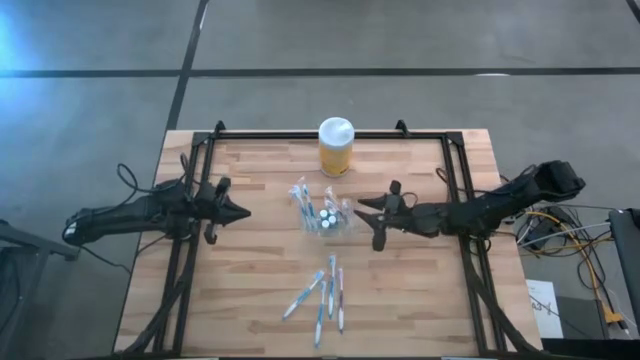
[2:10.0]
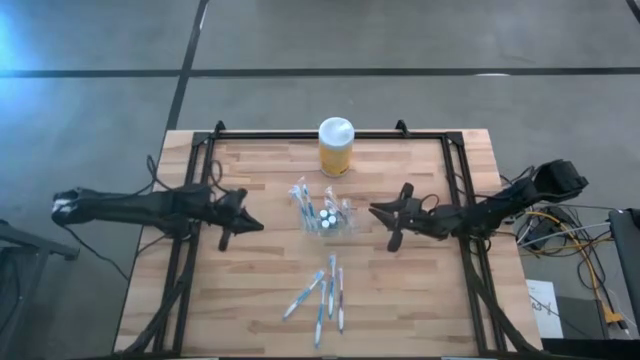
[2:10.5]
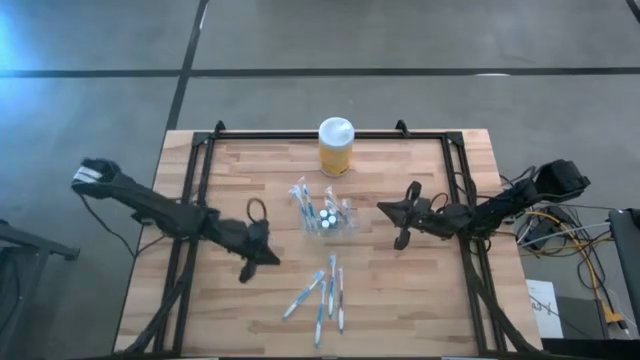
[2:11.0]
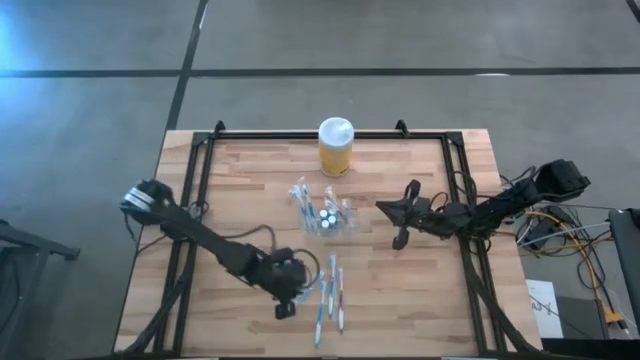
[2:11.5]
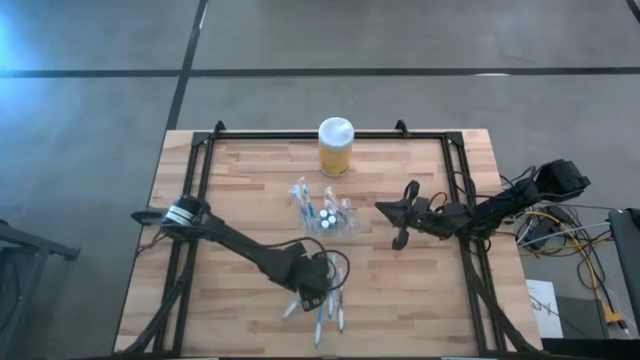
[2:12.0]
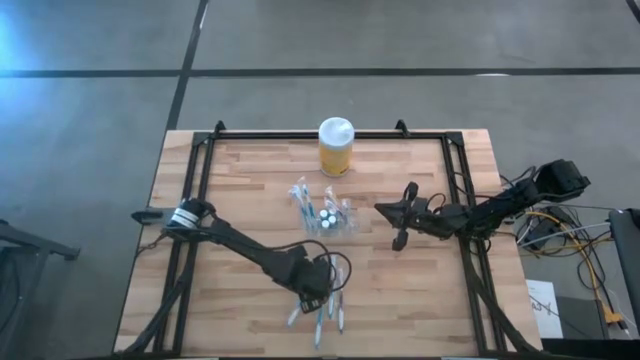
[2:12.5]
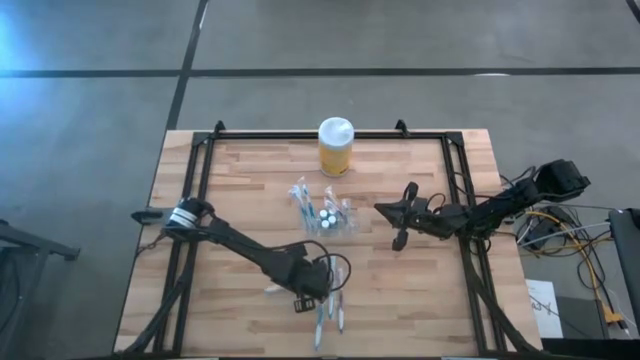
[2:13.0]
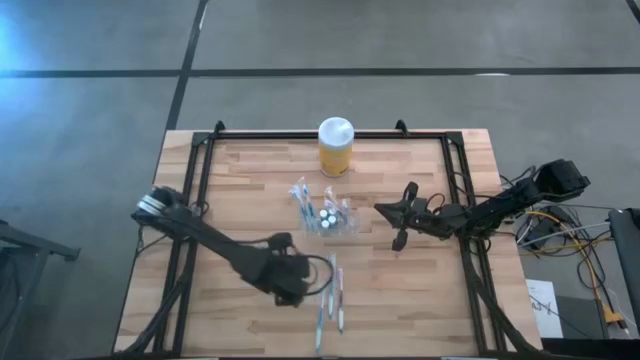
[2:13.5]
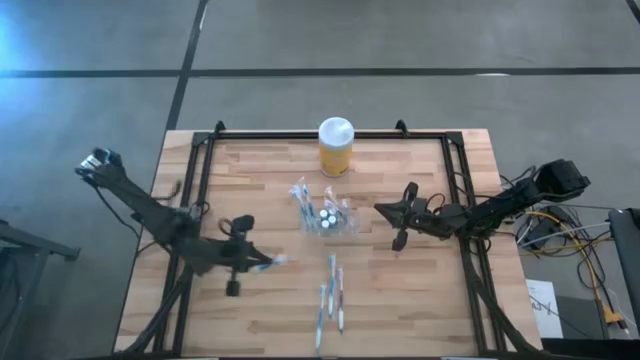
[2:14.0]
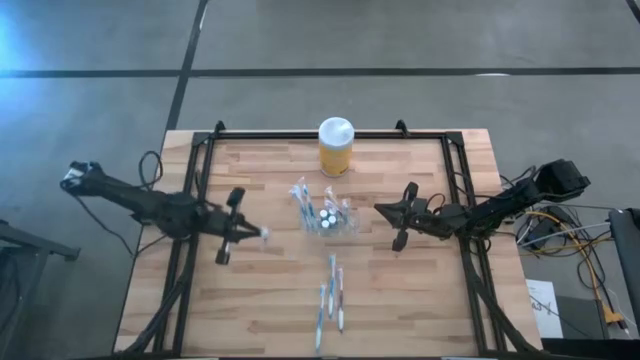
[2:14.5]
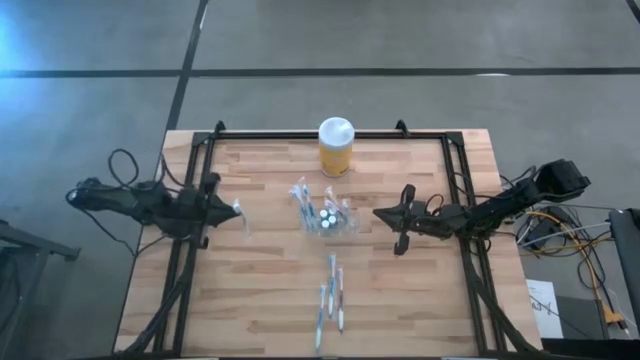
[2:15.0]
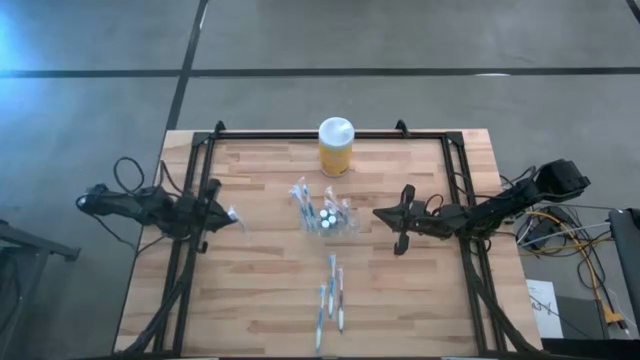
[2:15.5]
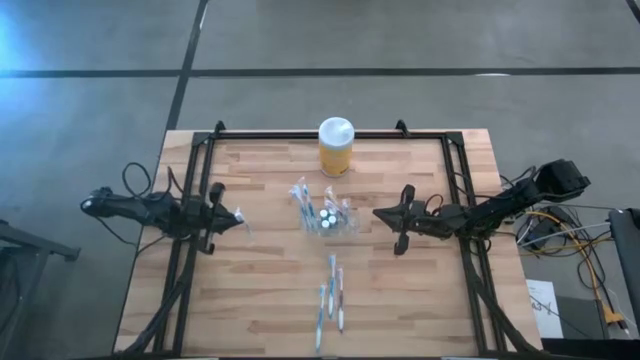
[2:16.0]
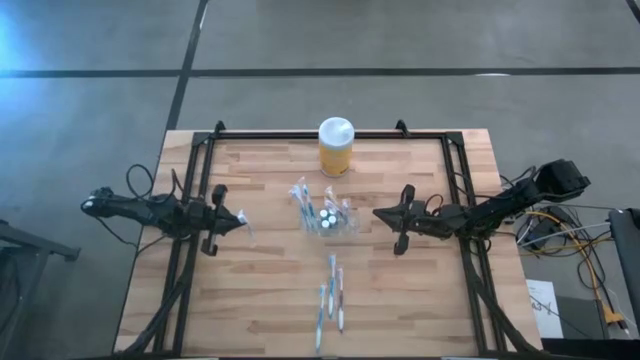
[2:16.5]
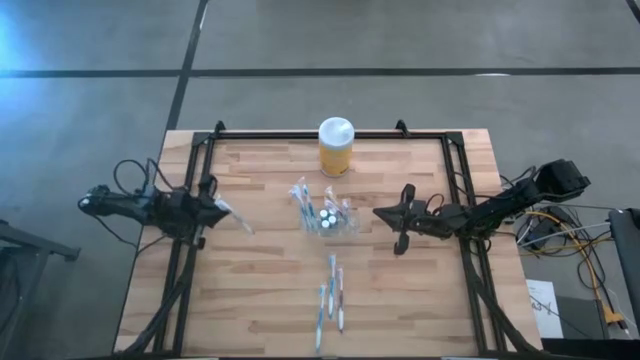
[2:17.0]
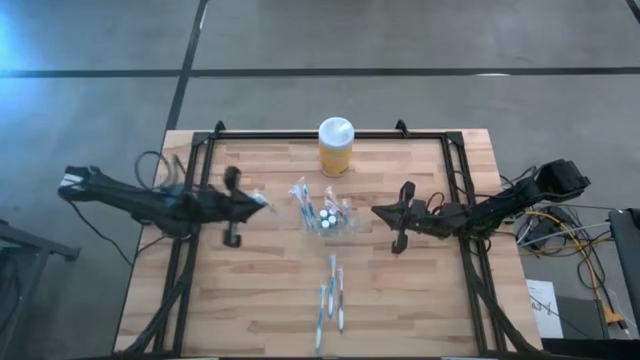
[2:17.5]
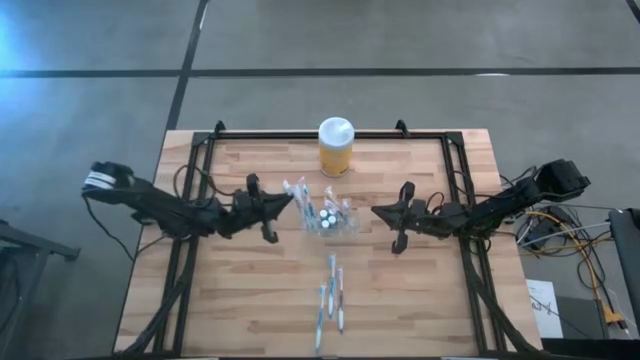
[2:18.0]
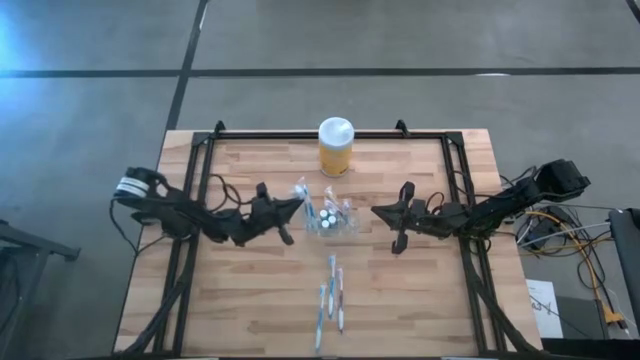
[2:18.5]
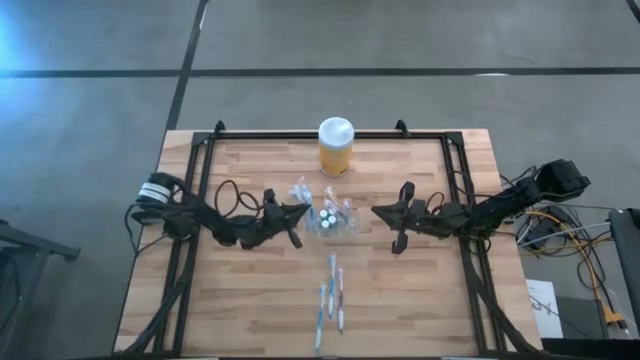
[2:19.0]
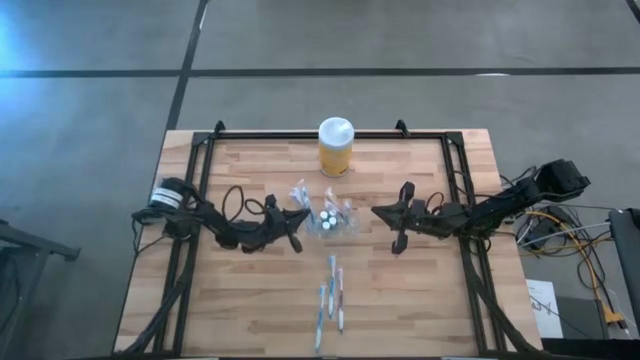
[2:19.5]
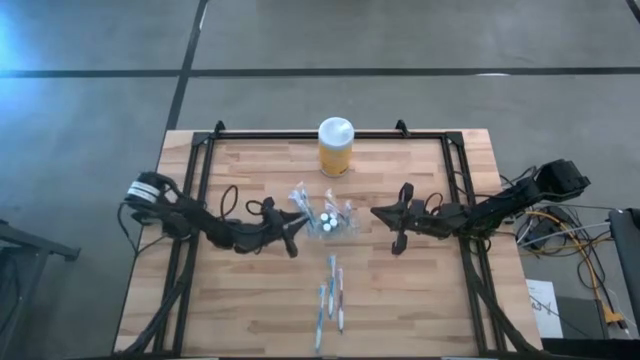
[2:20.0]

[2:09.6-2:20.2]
Task: Pick & Place toothbrushing station
Put the blue toothbrush into the transparent organizer

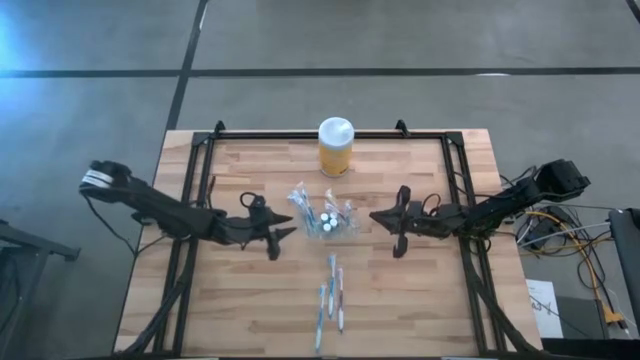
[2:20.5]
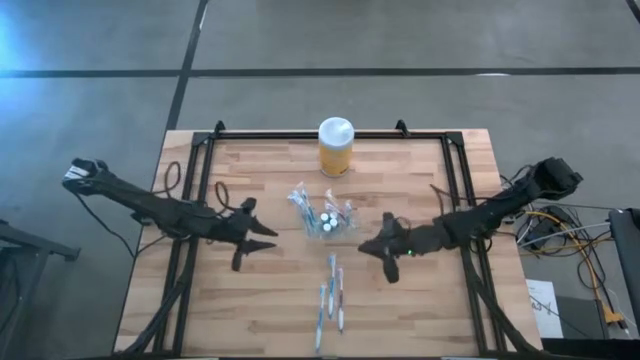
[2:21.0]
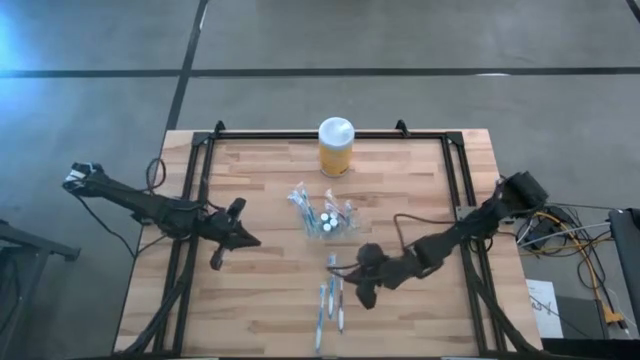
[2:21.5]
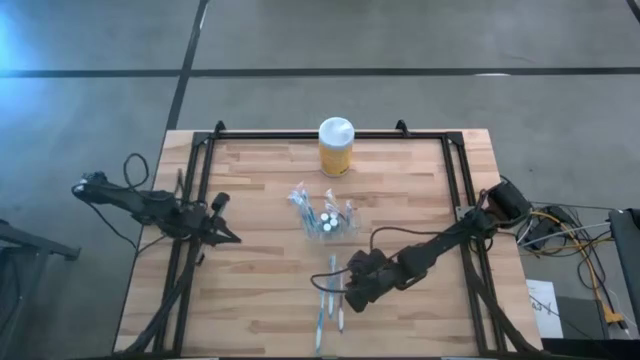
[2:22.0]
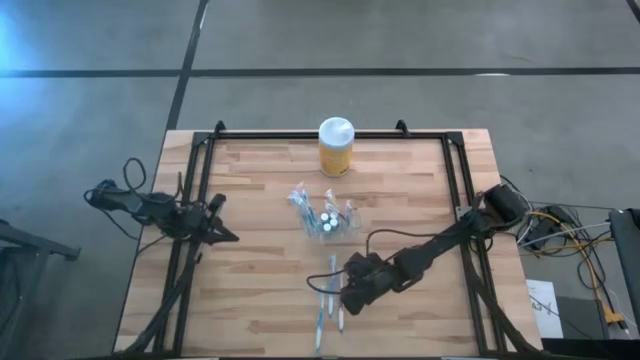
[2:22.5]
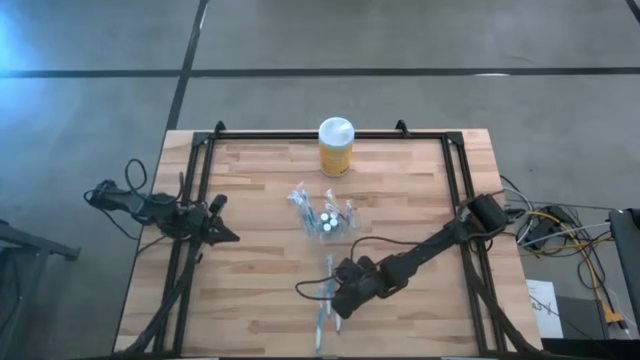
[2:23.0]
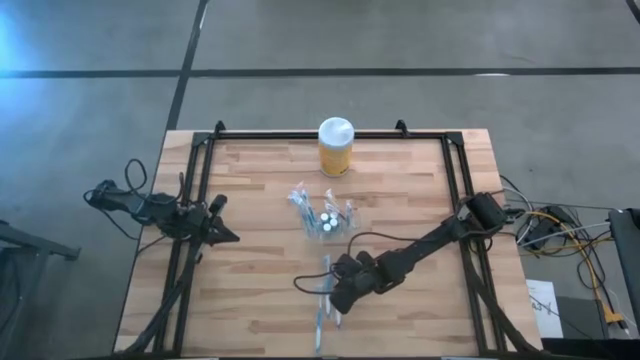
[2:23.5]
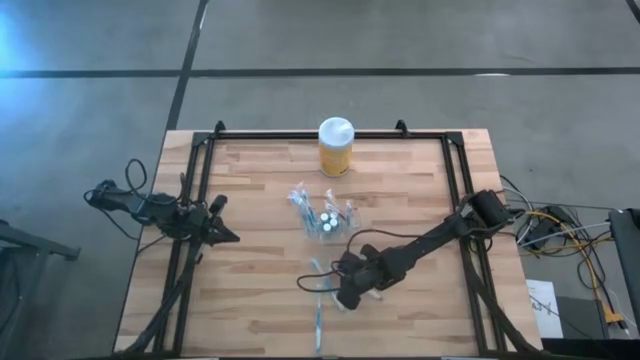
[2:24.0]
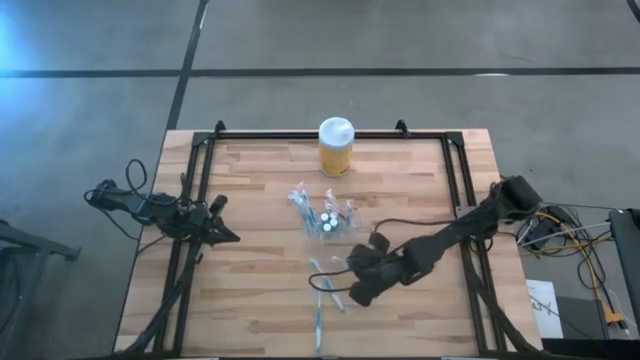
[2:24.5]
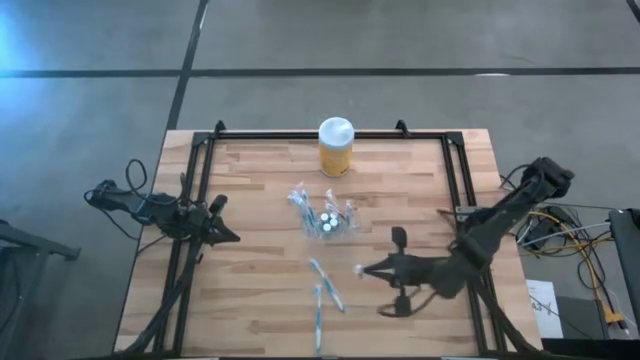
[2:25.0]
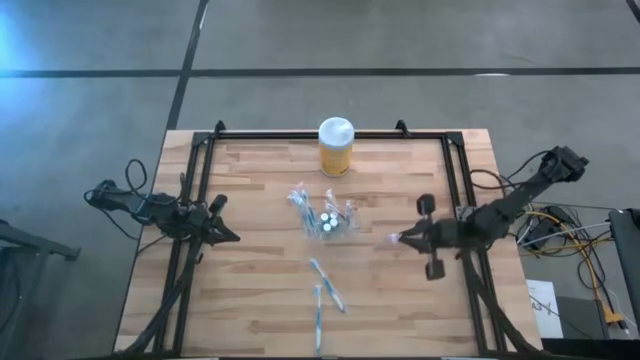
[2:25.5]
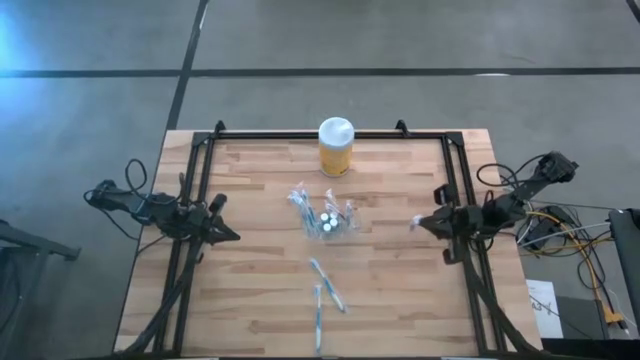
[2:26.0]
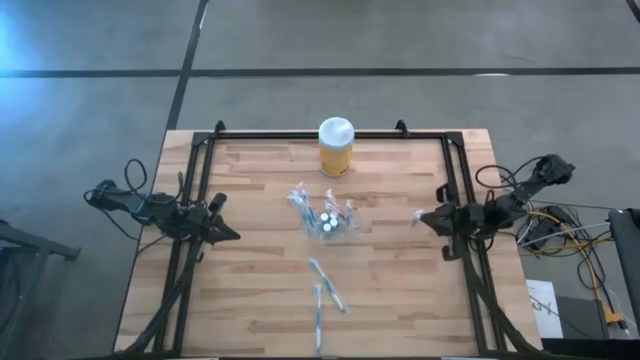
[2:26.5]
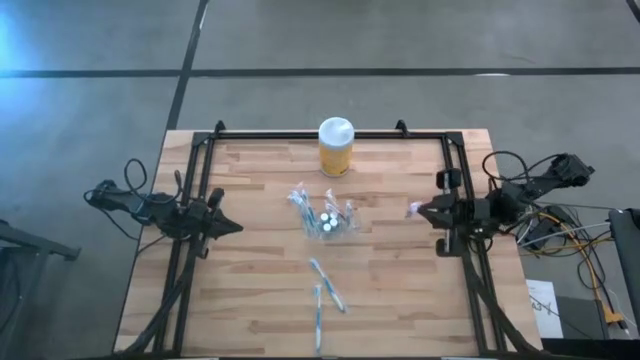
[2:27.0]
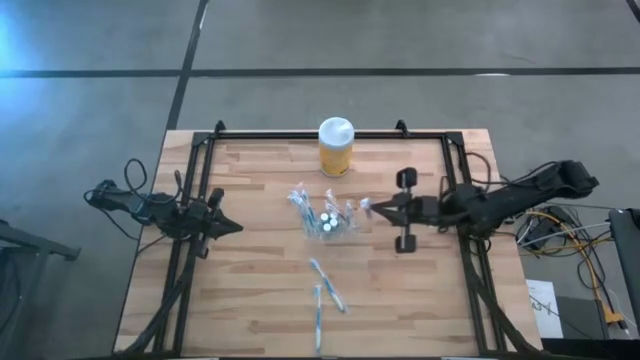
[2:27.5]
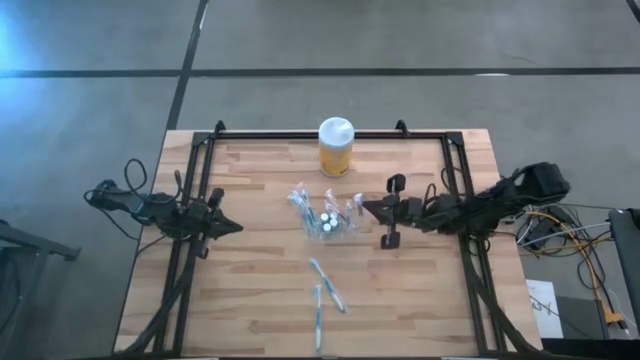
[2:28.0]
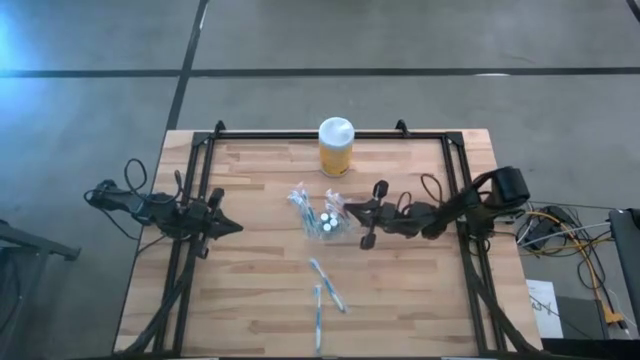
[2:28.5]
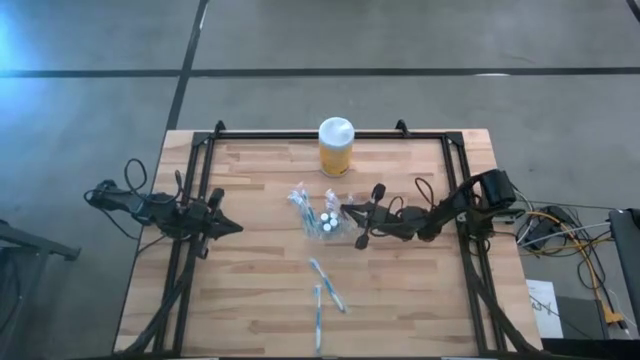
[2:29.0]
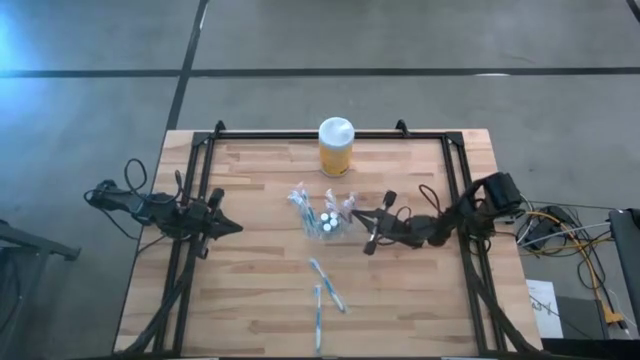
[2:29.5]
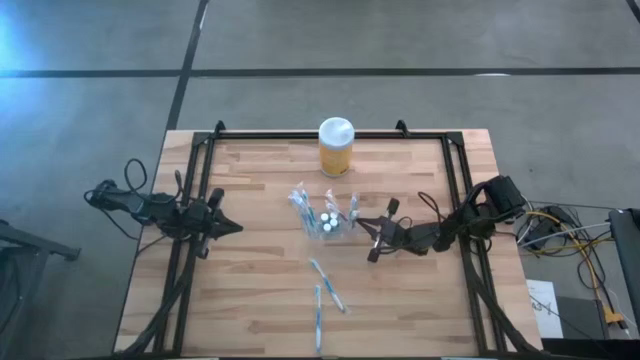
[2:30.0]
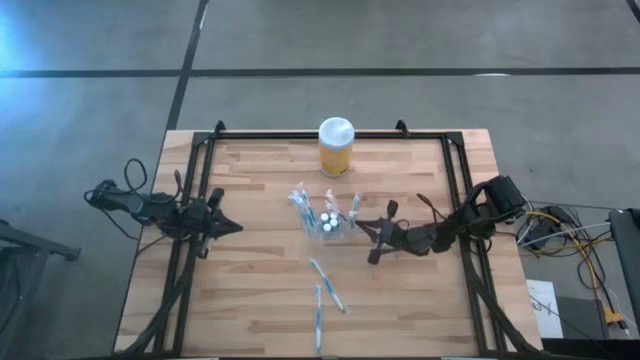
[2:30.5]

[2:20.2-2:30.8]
Put the violet toothbrush into the transparent organizer

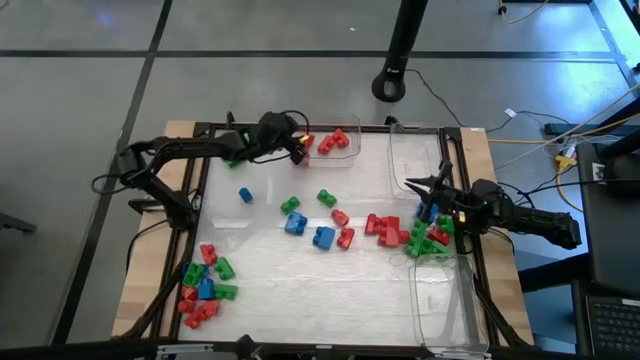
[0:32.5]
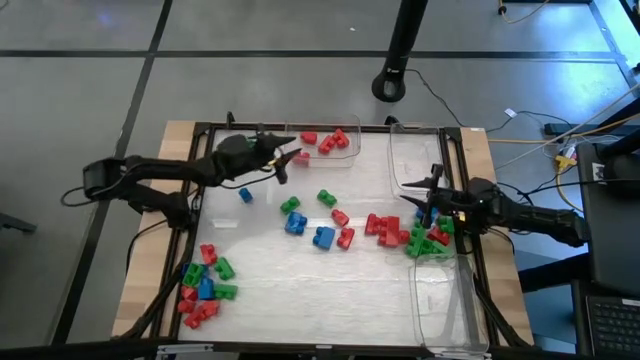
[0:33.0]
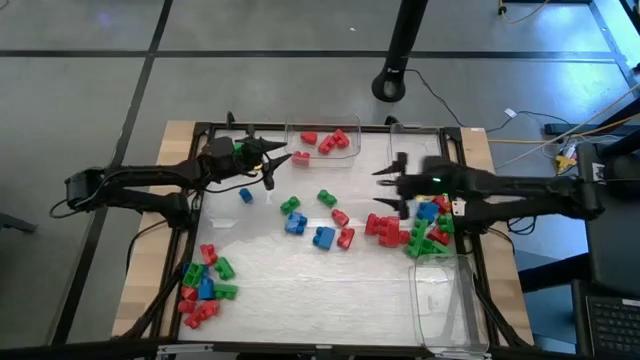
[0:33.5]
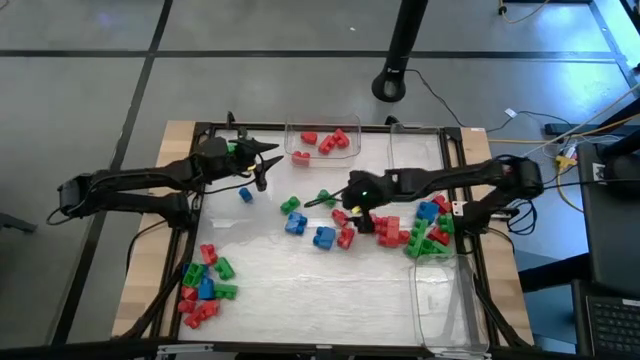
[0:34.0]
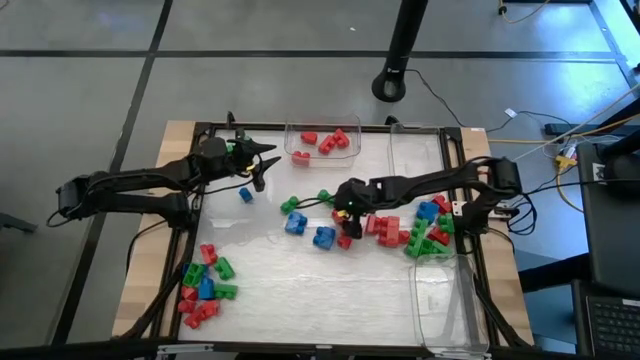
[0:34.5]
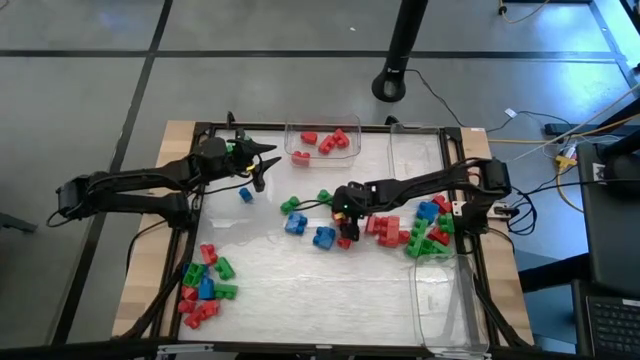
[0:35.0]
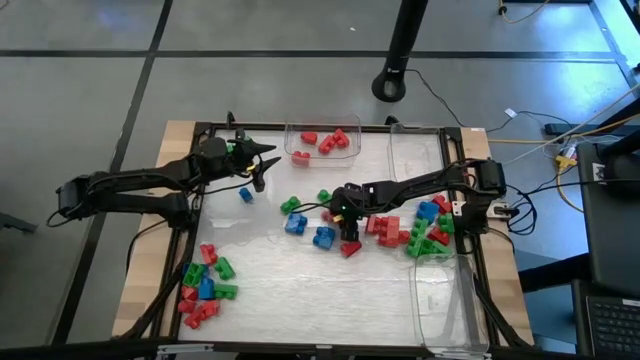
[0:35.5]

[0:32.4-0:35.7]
Task: Sort blocks
Put the red game piece into the top left transparent bin
